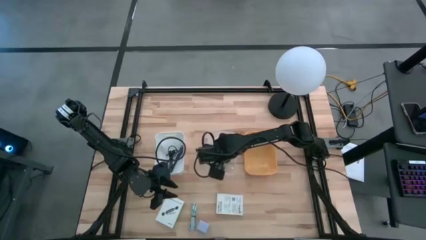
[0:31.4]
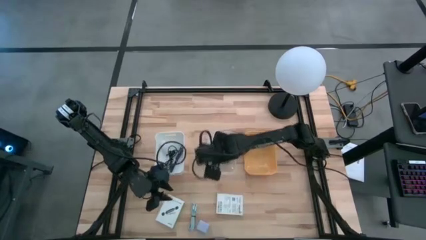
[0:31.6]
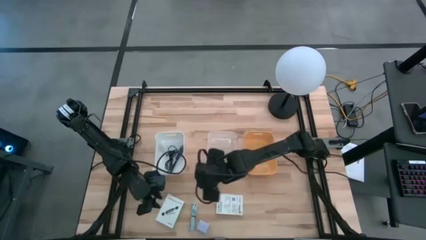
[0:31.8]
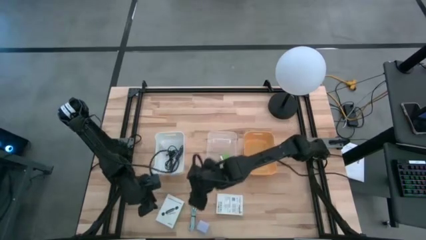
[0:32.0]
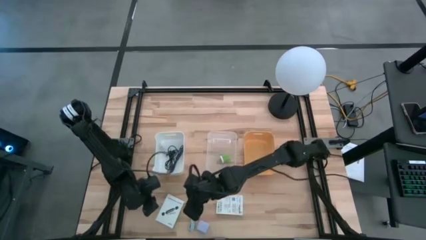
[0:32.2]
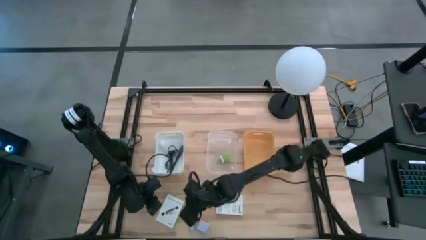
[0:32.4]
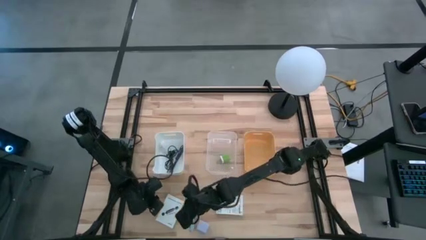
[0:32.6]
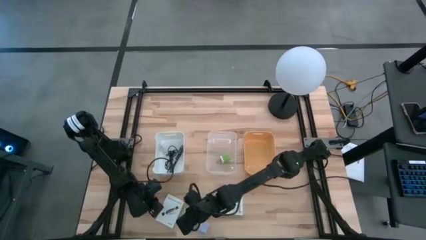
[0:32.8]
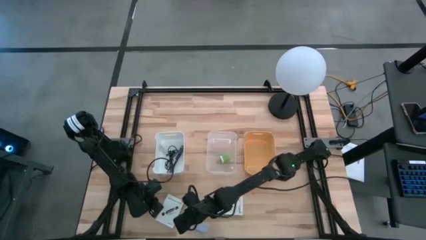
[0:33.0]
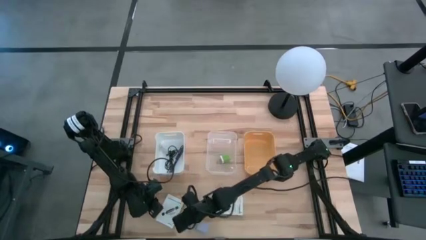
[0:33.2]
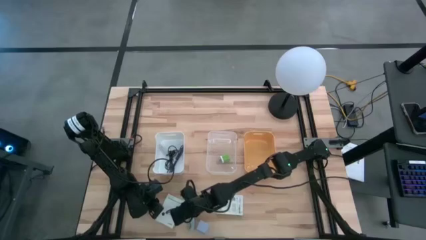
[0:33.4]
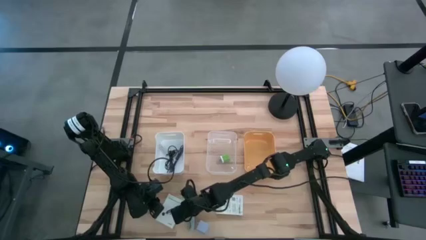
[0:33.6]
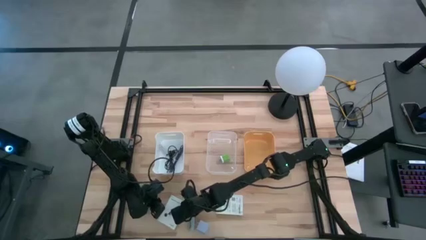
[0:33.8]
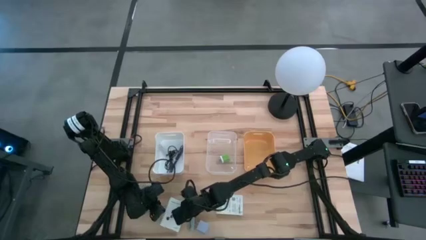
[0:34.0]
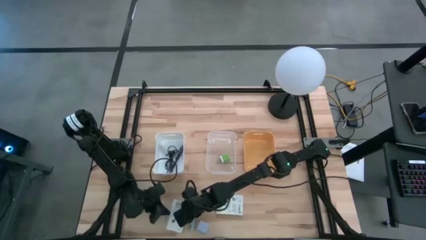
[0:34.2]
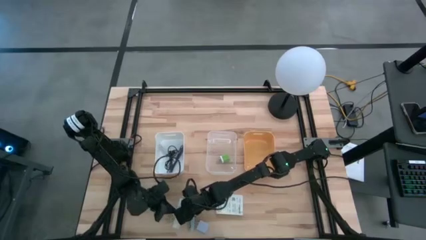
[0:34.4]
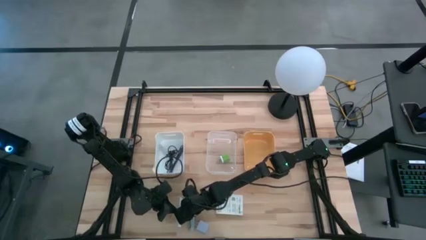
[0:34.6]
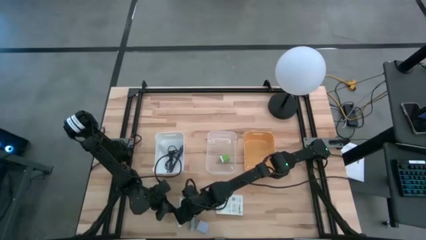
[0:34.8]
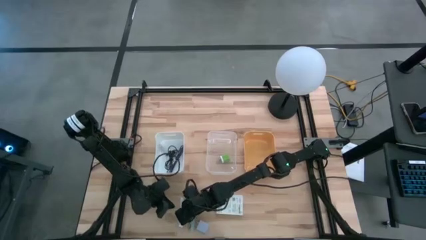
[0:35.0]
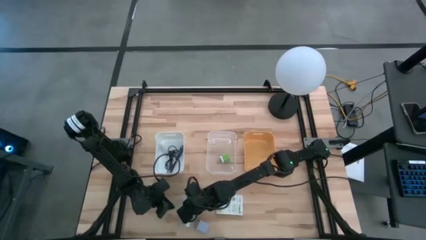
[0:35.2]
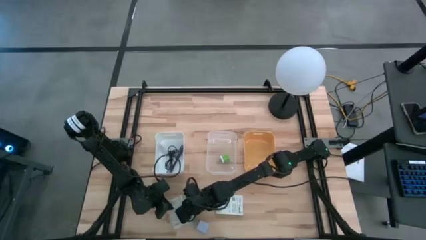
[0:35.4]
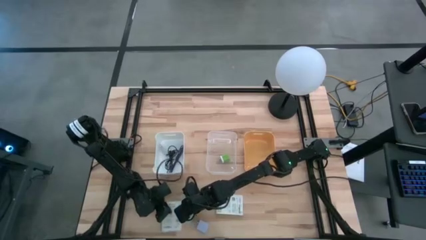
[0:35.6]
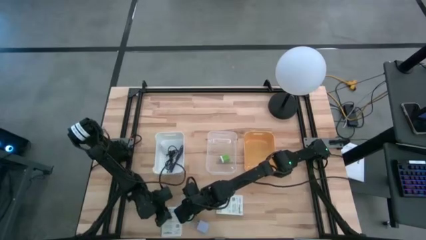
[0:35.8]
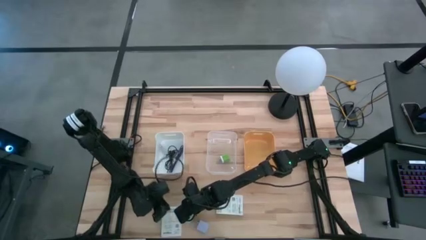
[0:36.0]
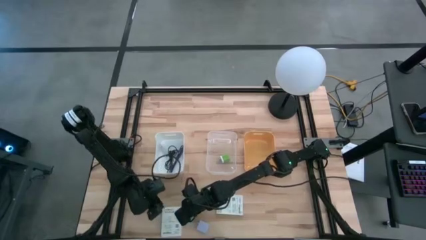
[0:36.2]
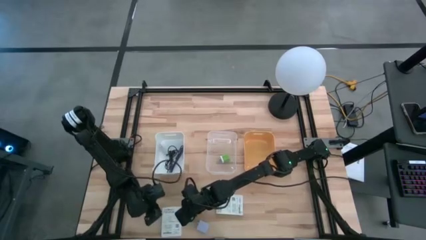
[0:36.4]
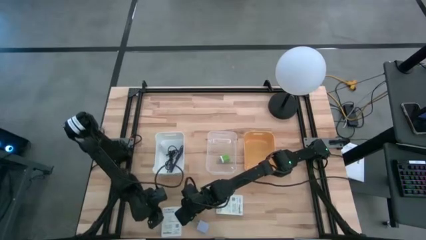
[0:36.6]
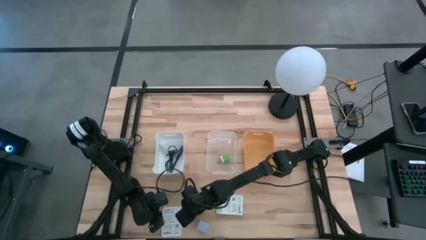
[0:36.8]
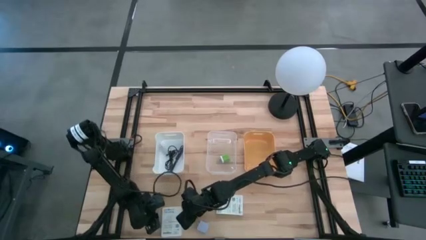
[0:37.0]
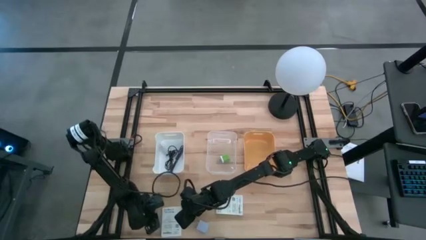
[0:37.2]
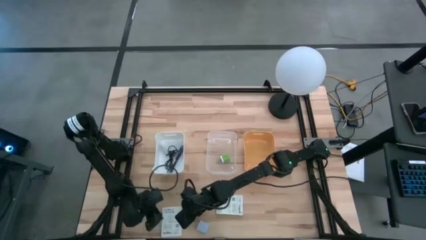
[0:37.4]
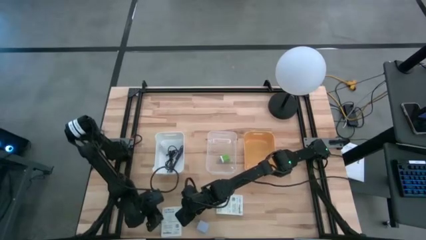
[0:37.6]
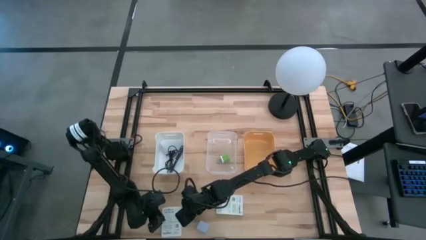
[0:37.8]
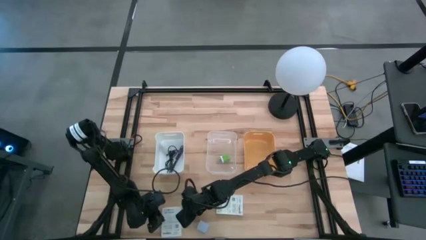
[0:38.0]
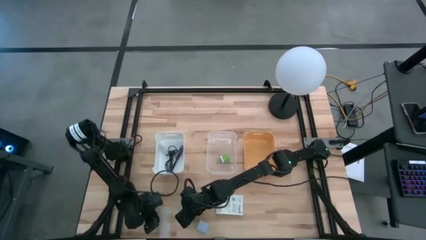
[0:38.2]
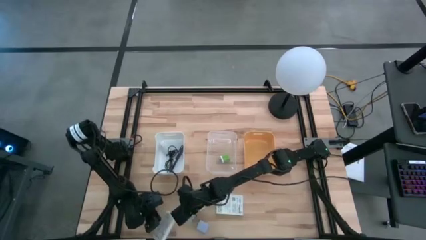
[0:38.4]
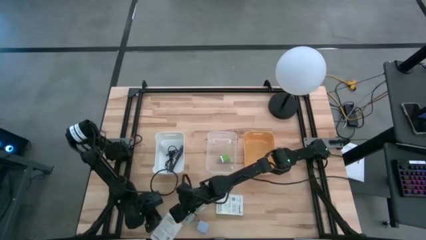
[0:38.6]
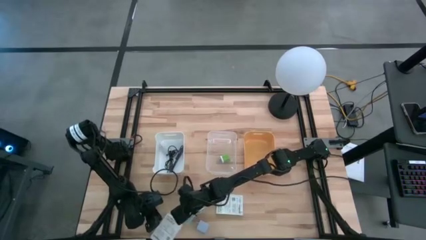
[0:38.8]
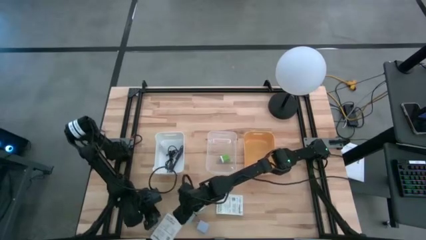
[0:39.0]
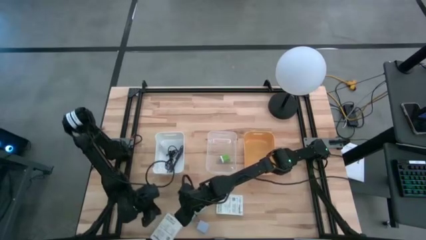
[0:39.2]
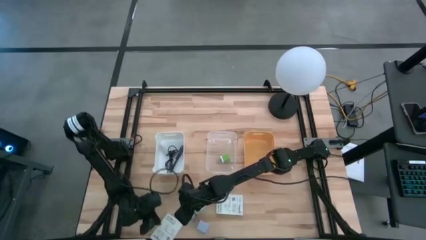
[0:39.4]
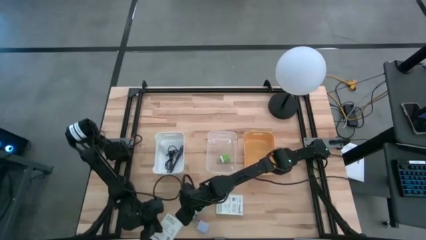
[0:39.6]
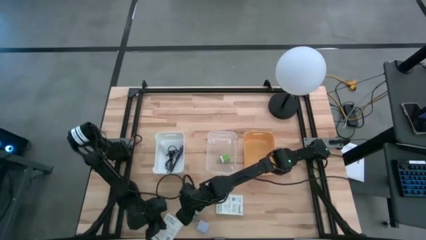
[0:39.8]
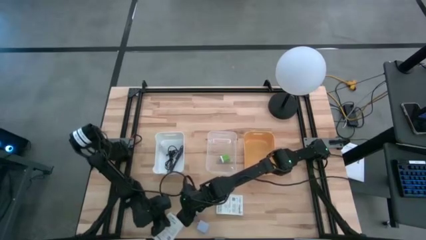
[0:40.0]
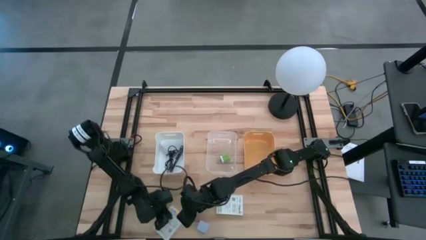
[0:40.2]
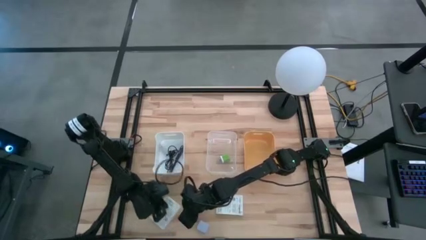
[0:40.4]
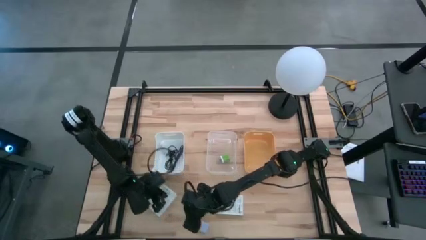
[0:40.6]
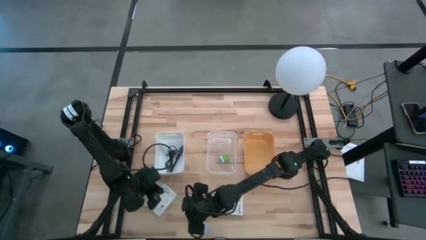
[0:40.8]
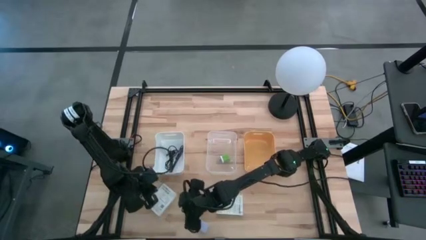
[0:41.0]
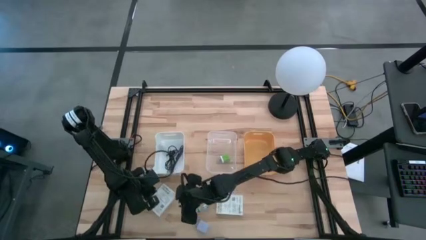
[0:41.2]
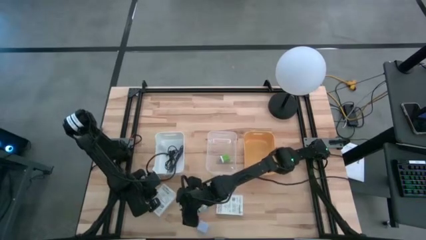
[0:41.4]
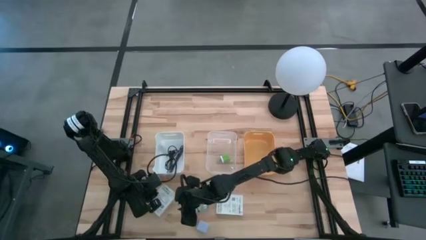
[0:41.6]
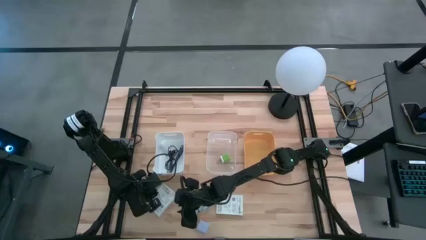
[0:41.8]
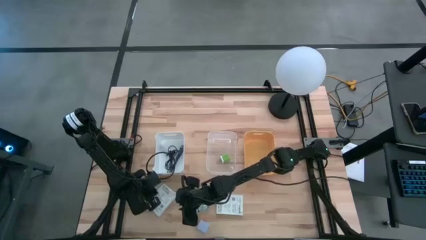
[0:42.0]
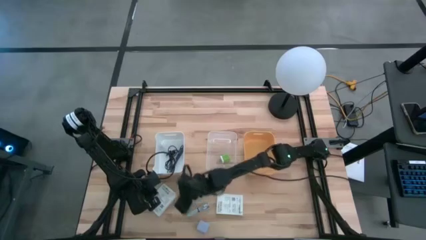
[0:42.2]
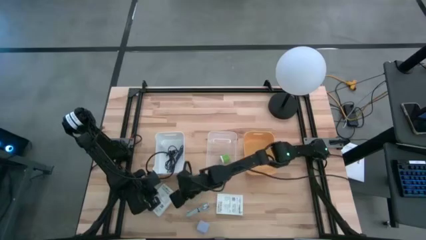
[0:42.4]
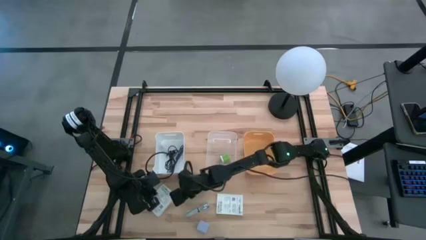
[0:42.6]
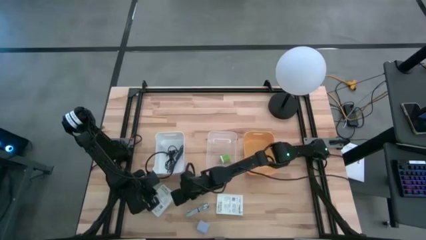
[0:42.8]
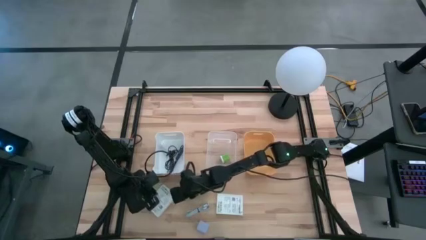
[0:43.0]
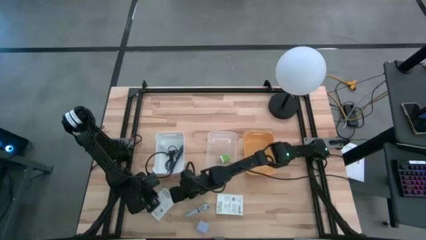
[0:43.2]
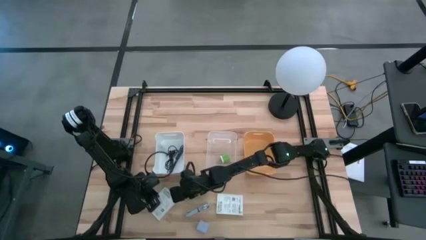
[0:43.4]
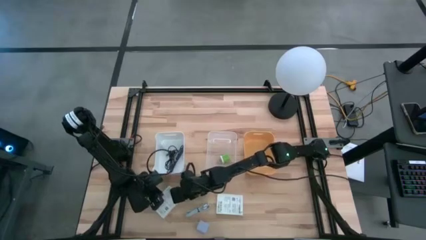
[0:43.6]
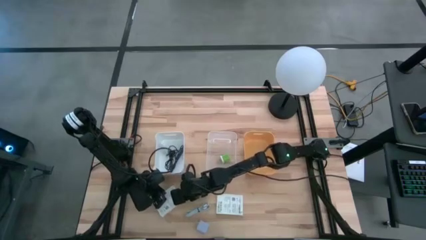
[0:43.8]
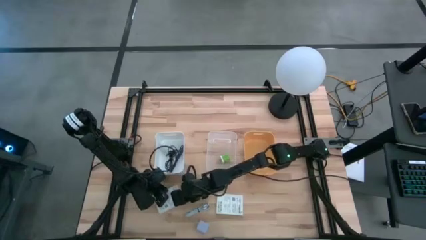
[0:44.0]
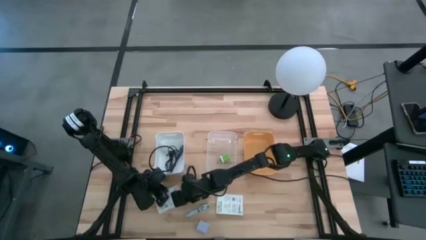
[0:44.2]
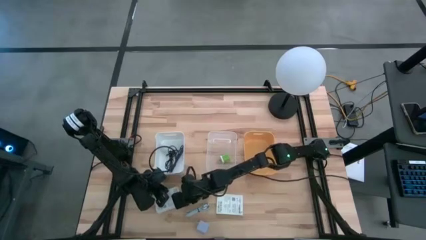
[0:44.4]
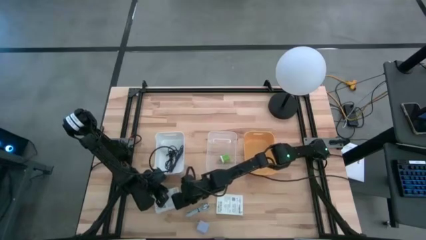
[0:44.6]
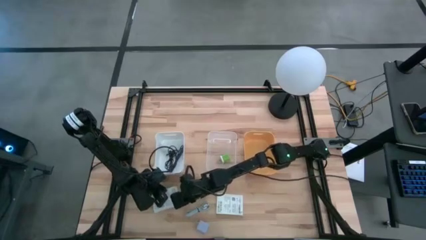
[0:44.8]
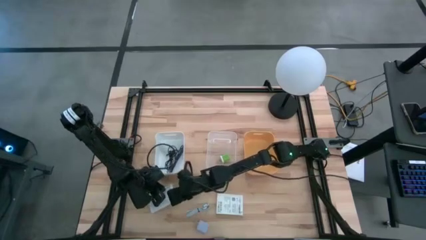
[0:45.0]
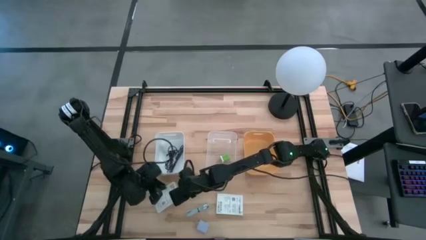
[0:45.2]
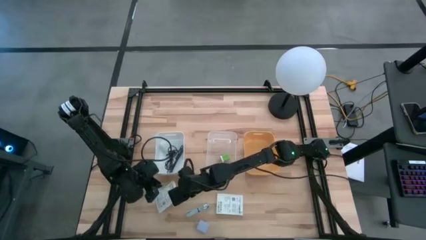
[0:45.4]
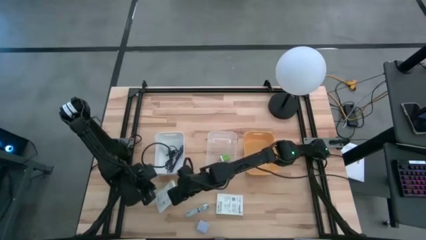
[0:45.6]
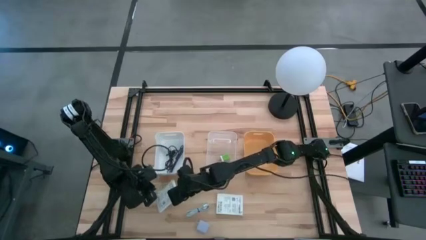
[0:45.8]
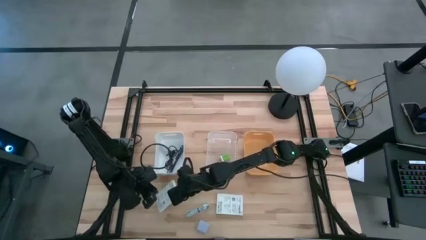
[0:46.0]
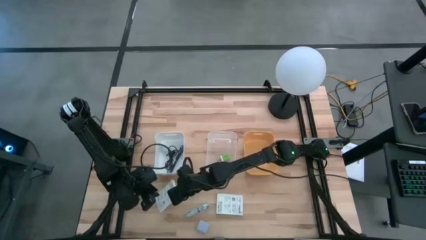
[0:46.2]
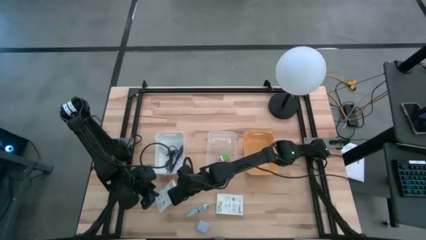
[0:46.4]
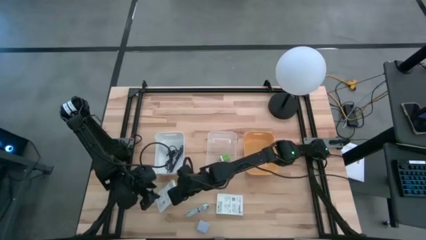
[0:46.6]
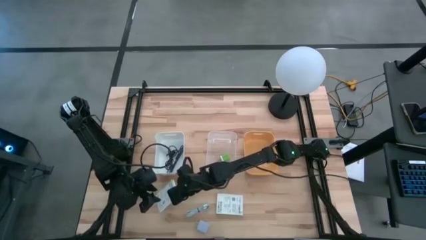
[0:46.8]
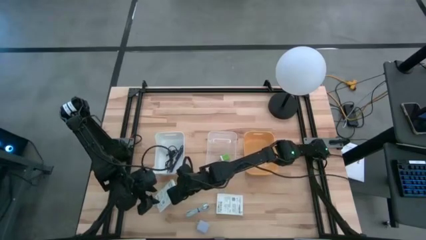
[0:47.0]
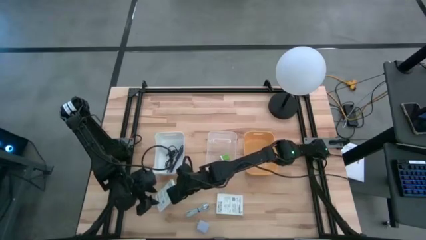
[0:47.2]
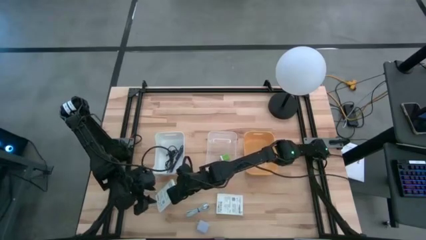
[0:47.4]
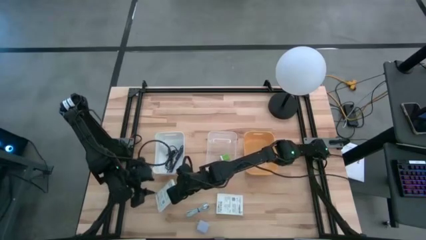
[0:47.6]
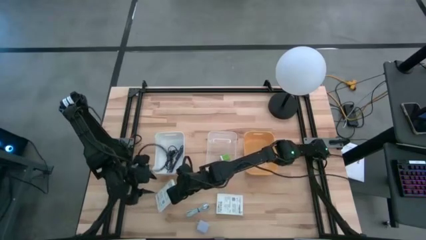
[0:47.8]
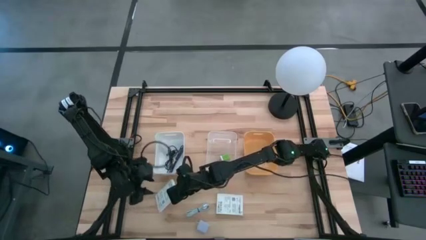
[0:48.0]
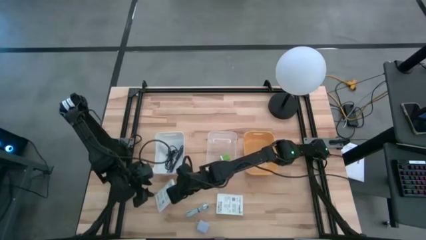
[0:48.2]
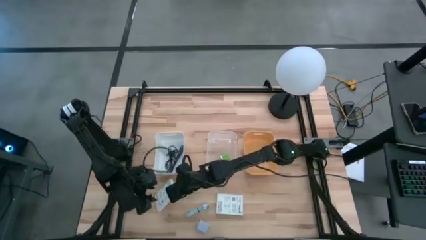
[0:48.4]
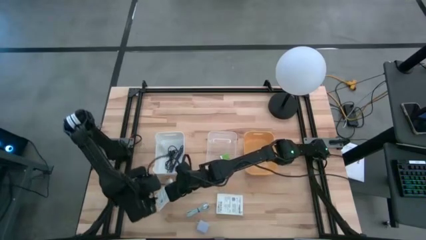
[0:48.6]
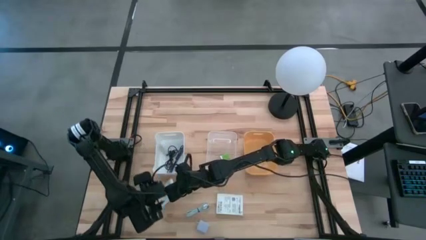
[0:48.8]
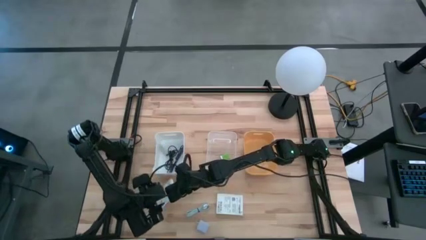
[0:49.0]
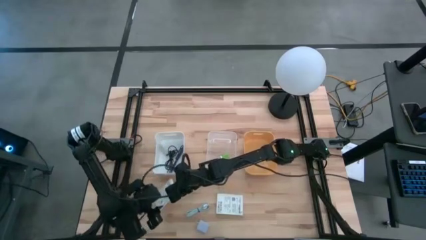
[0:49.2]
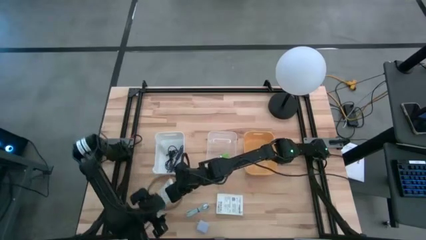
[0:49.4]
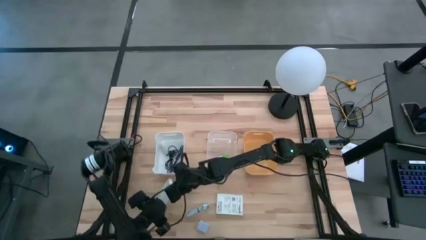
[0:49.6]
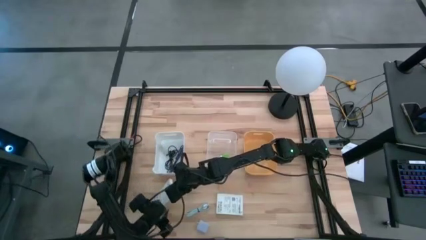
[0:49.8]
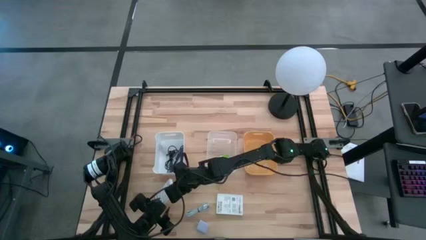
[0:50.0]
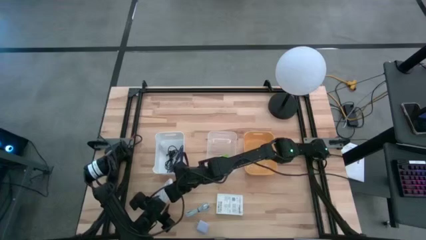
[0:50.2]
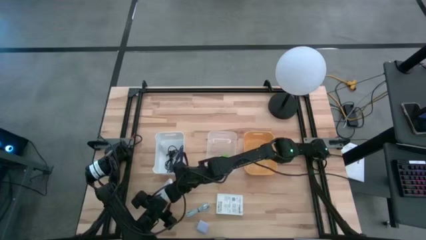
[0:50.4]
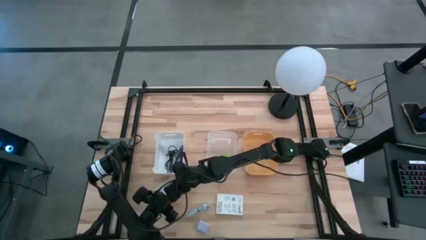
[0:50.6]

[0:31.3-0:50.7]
Task: Pick and place items into bin
Put the left card reader box into the yellow bin
